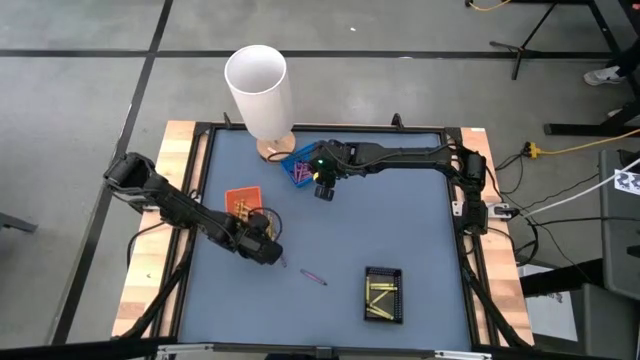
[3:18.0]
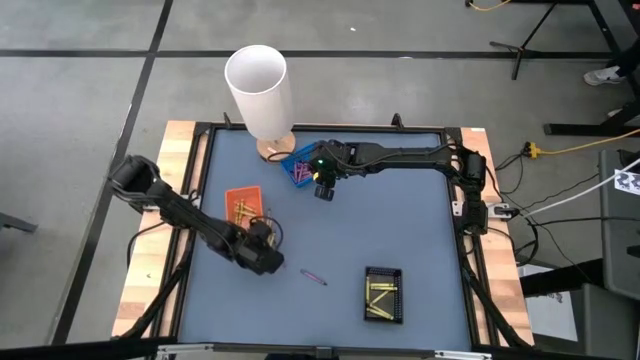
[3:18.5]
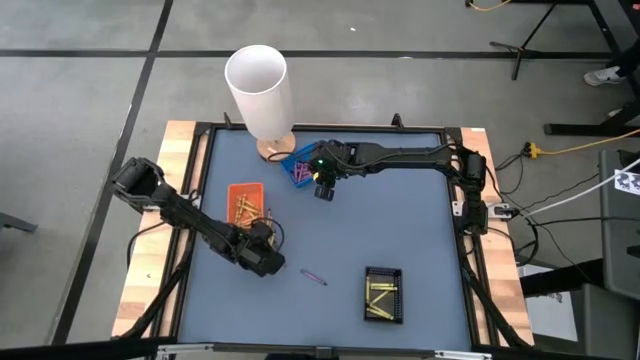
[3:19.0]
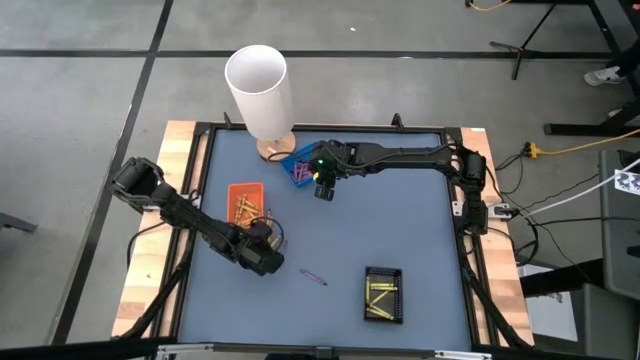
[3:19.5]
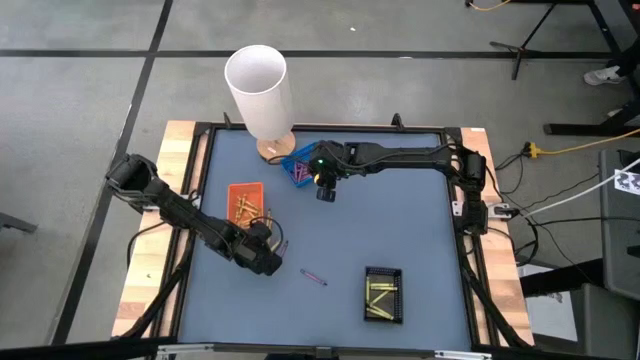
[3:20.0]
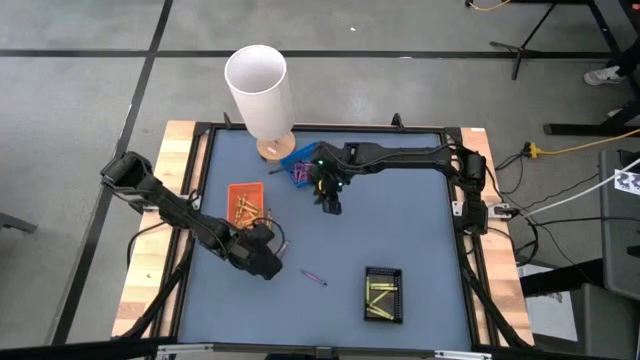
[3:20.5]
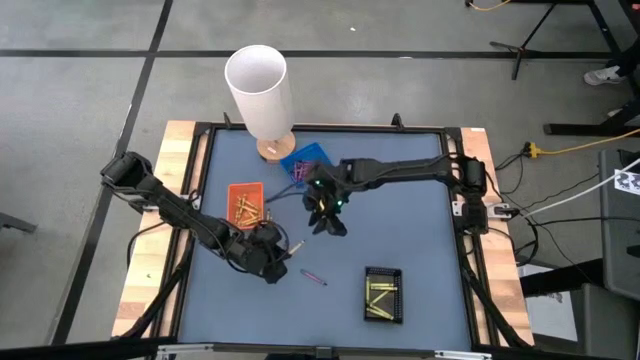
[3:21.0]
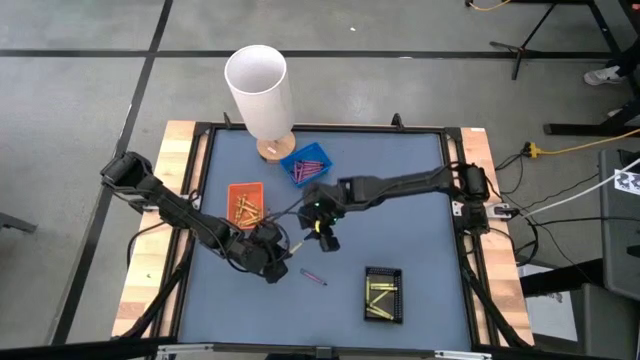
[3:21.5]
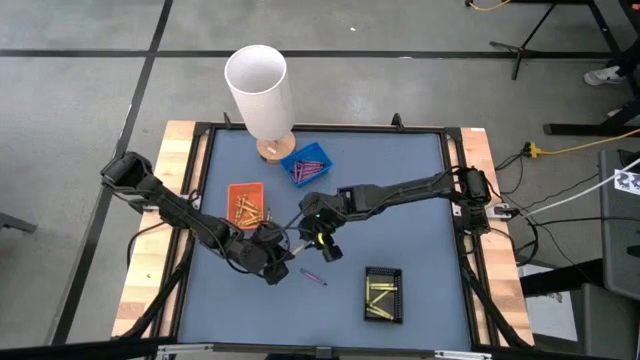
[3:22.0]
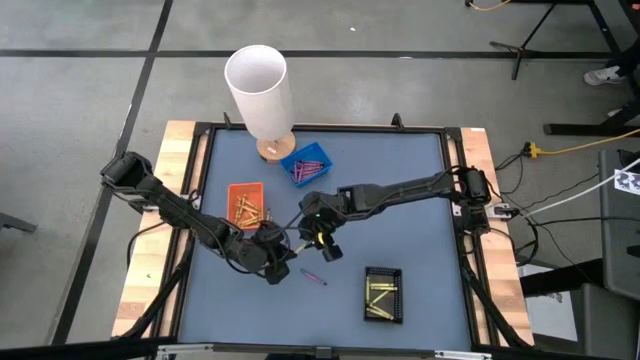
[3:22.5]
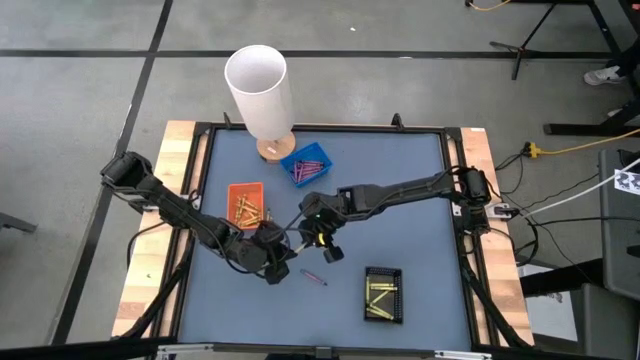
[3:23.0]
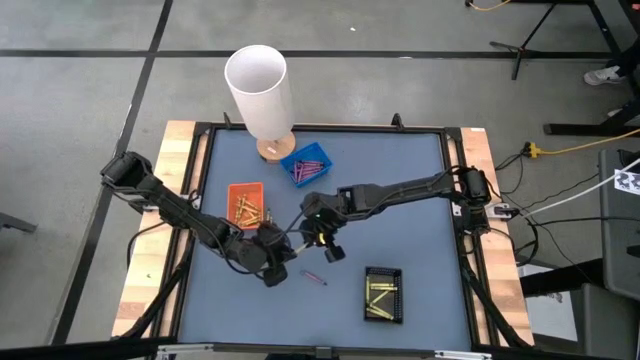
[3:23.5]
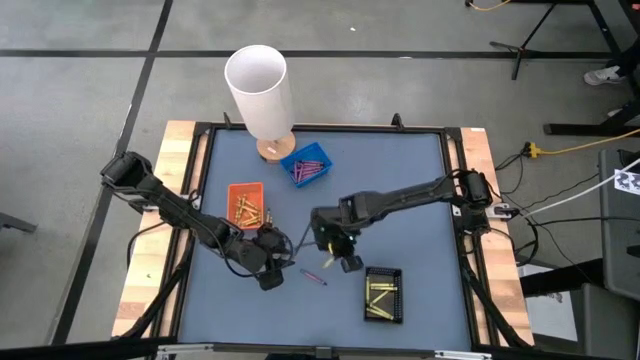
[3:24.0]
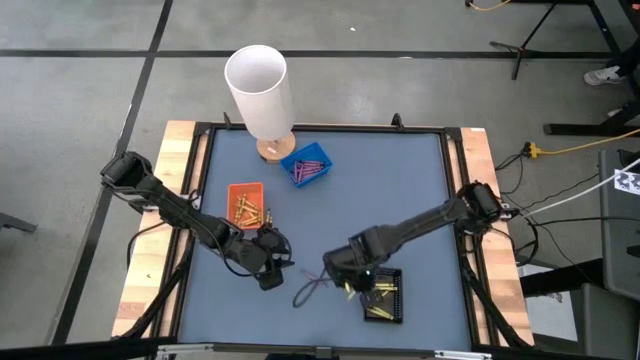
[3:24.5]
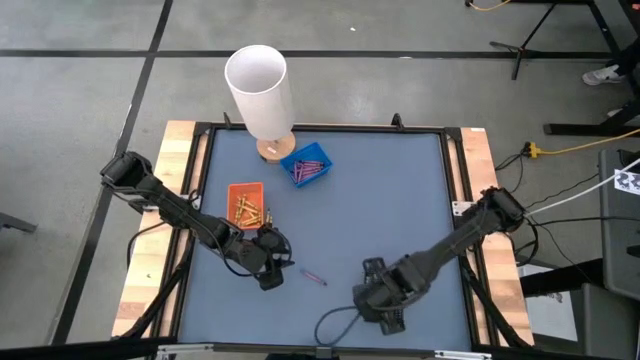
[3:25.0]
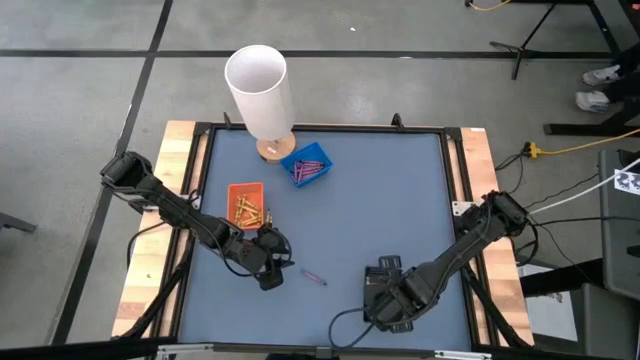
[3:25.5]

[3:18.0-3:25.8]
Task: Sort crayons
Put the green crayon into the black bin

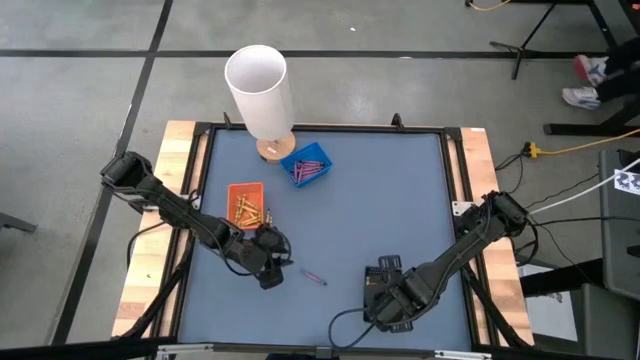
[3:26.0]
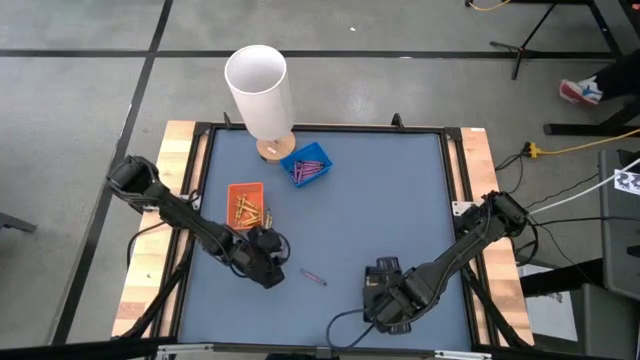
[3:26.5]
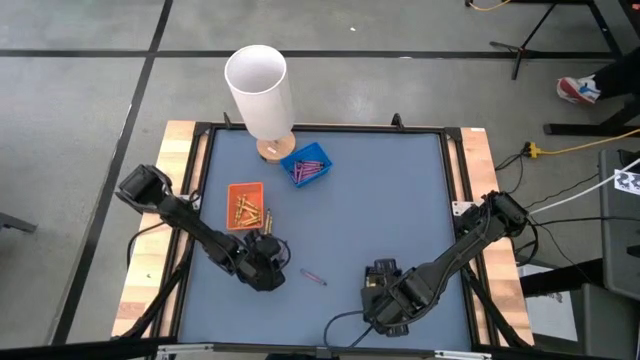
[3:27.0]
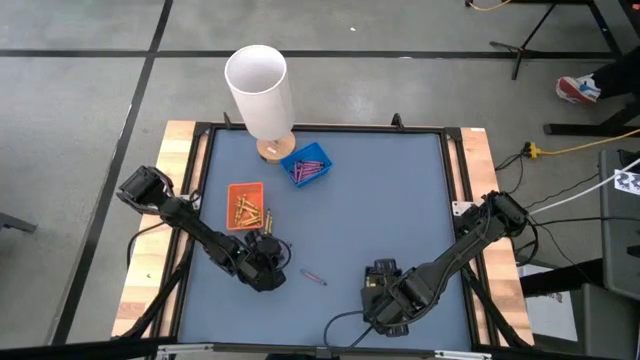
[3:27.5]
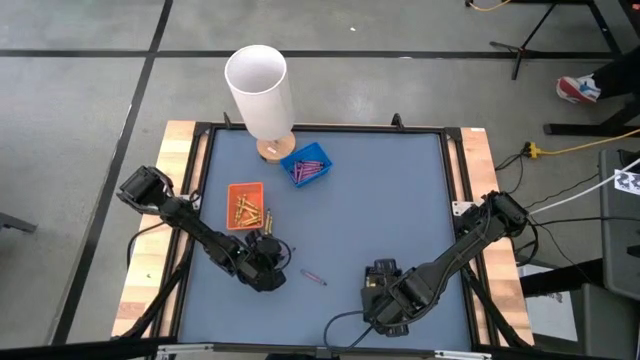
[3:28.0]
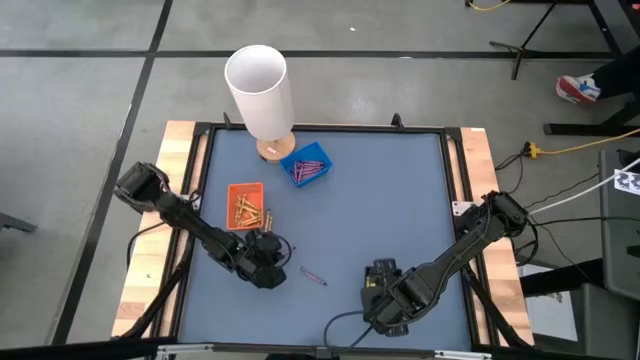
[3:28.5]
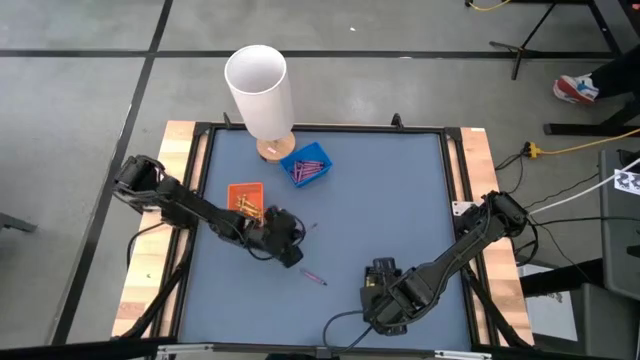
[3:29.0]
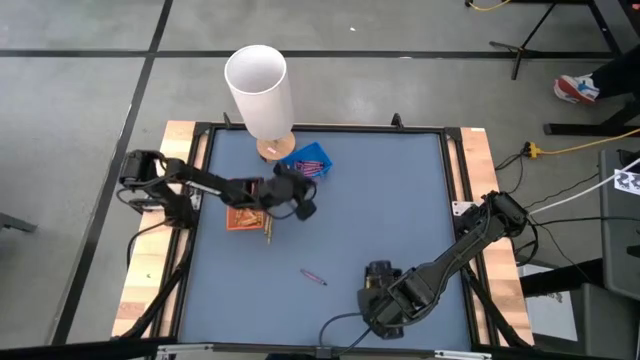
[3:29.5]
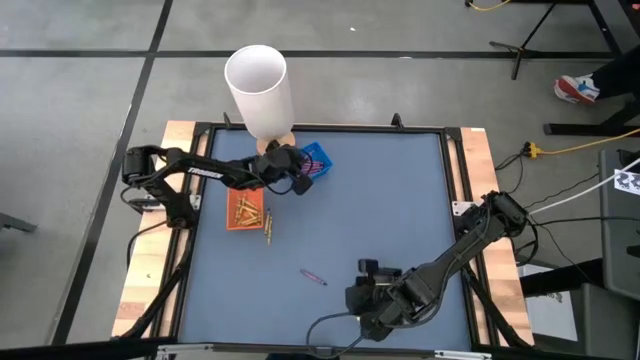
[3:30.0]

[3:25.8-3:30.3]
Put the violet crayon into the blue bin

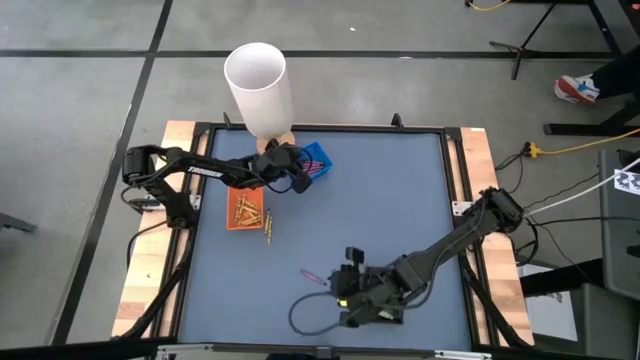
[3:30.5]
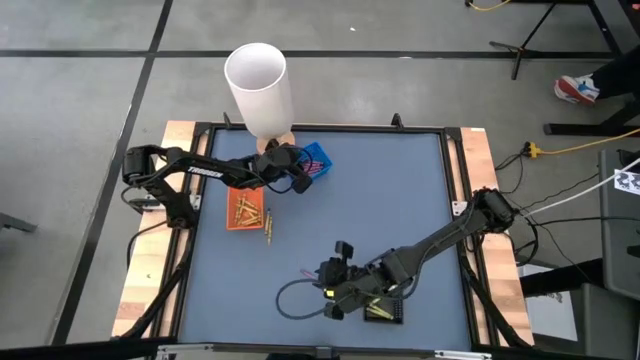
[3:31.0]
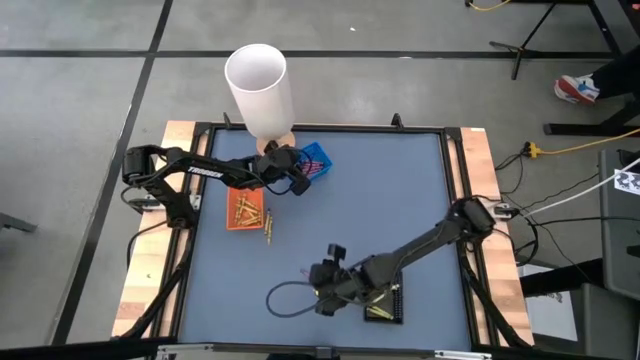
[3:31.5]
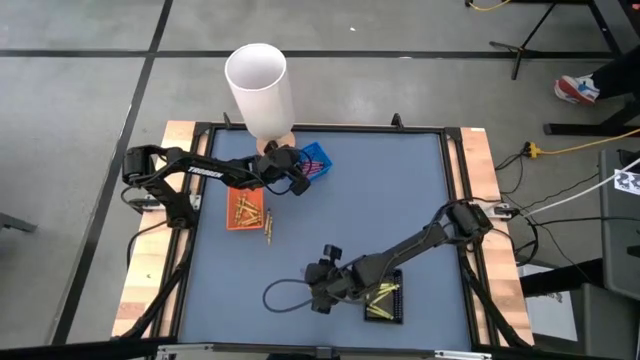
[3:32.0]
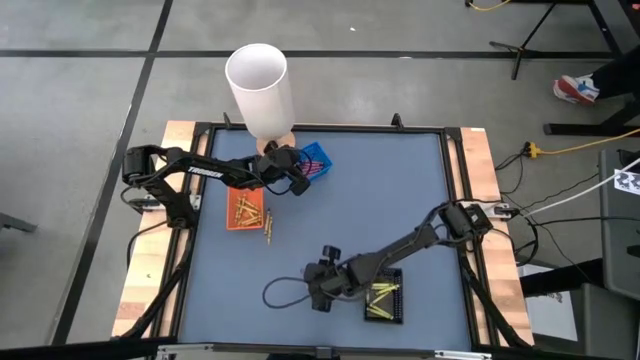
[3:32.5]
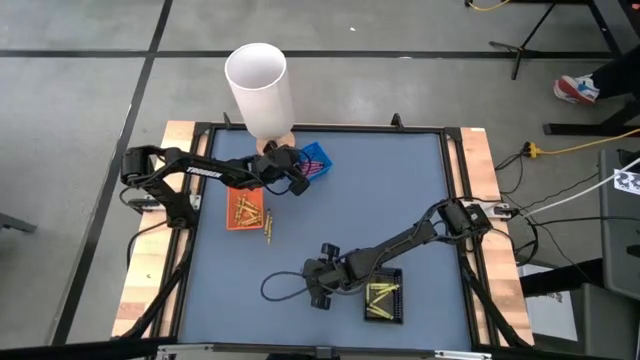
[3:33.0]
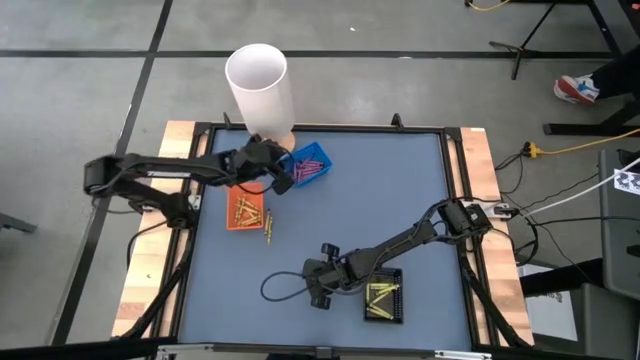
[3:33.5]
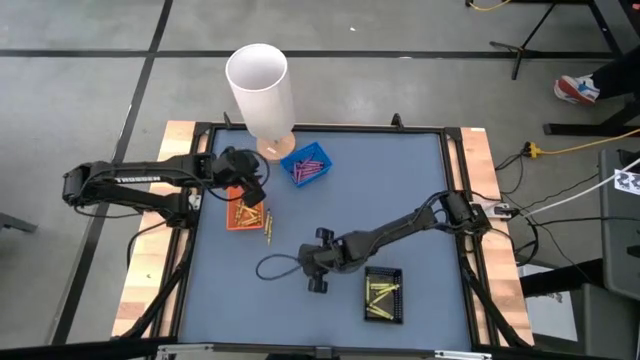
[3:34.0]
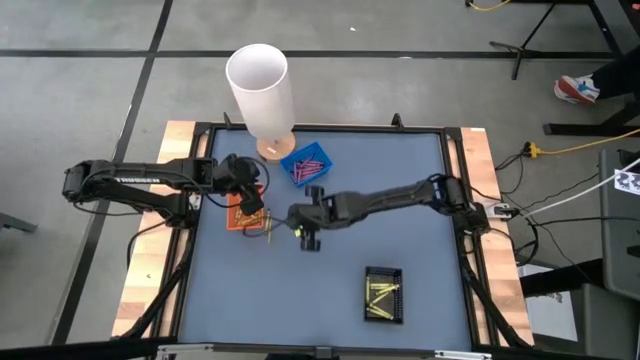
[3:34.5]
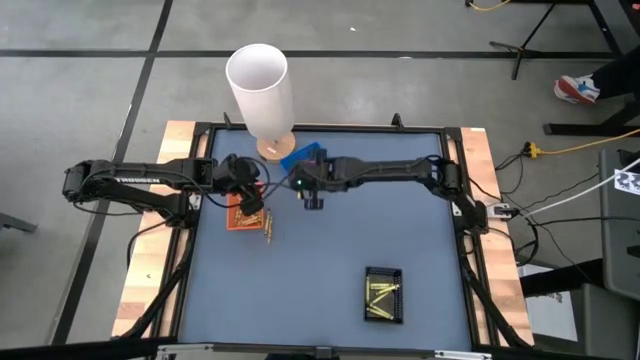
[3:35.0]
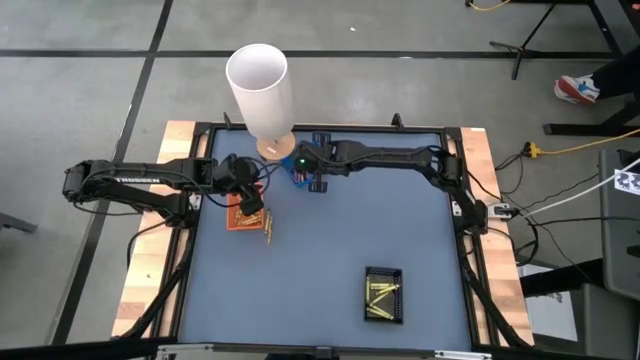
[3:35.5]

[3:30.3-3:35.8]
Put the violet crayon into the blue bin

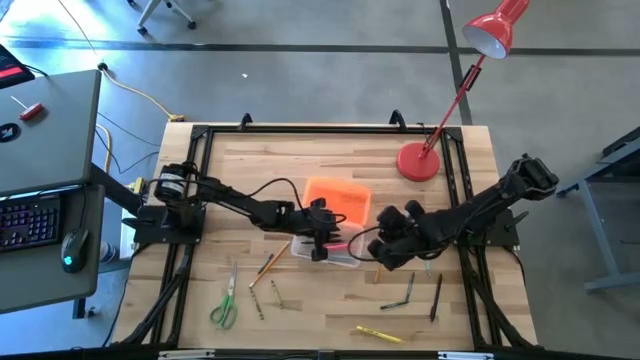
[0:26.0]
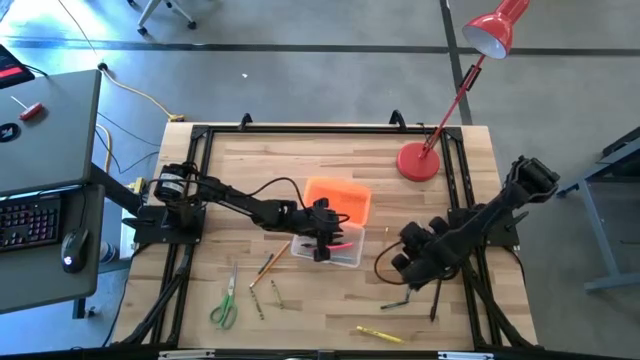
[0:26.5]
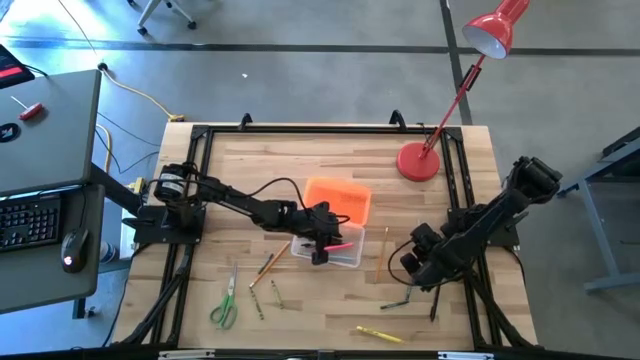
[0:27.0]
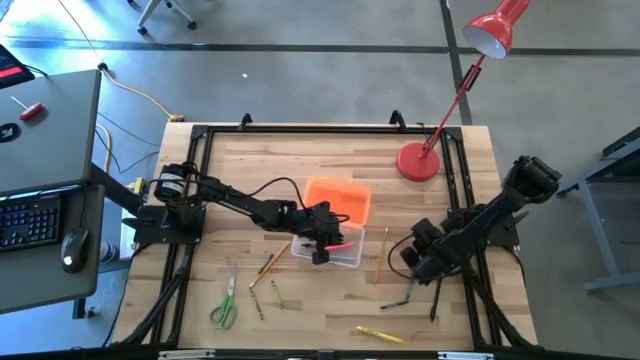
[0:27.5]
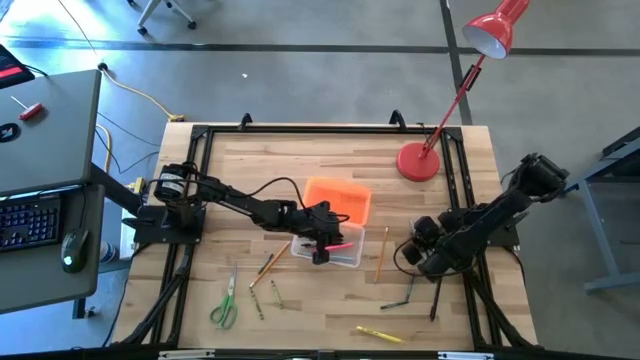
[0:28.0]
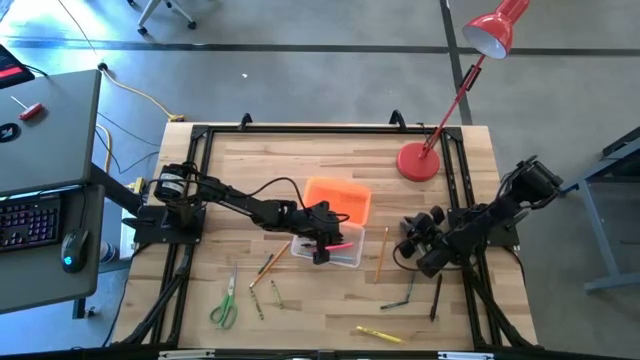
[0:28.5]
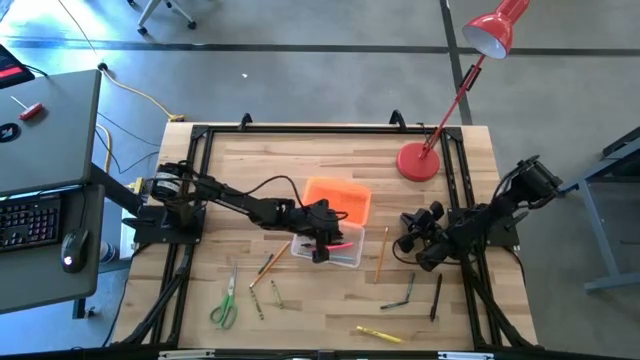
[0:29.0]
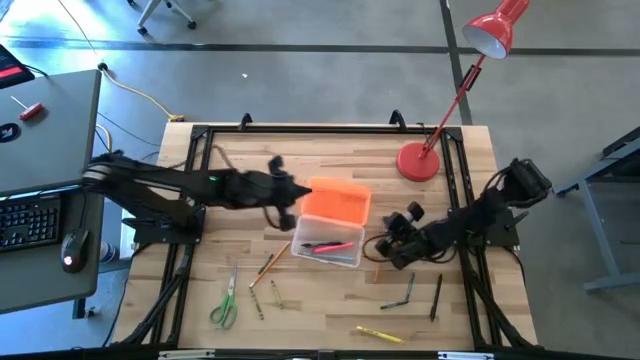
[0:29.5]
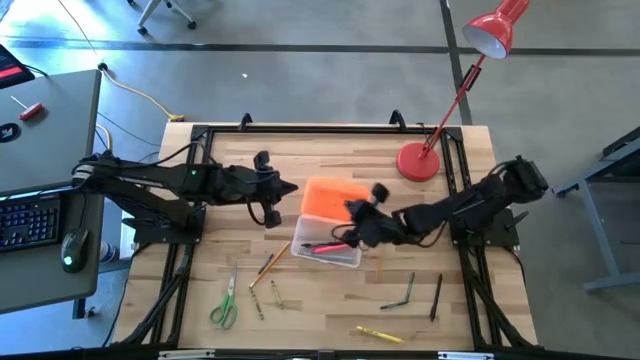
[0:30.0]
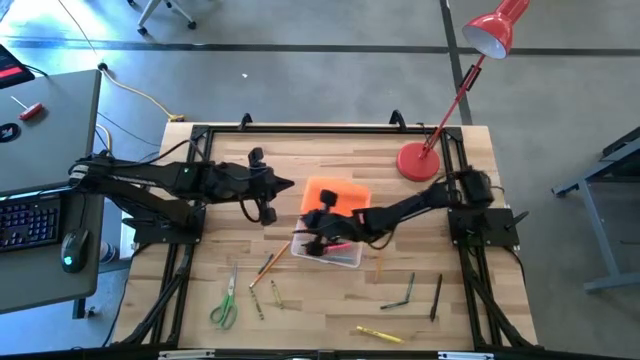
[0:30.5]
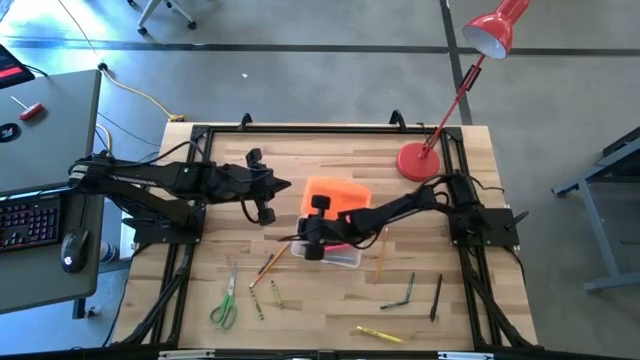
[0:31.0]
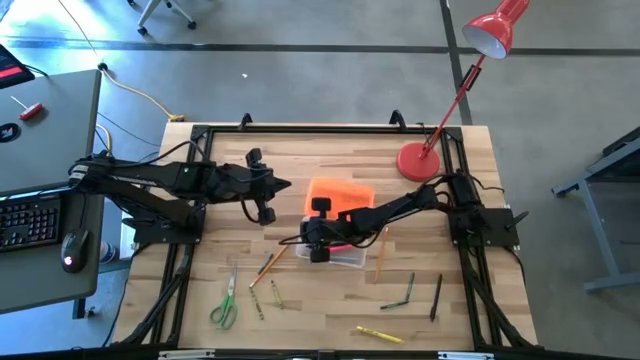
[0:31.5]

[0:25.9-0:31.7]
Task: Pick & place school supplies into a supply box
Put the light blue pen into the supply box
